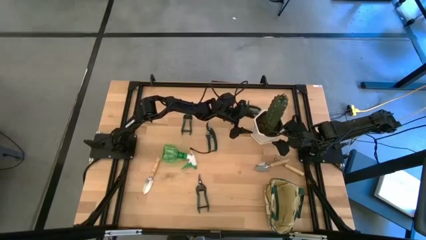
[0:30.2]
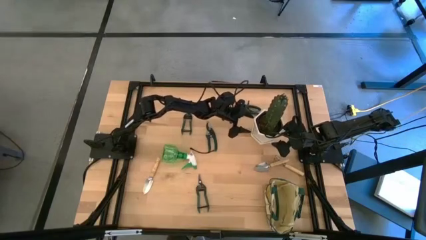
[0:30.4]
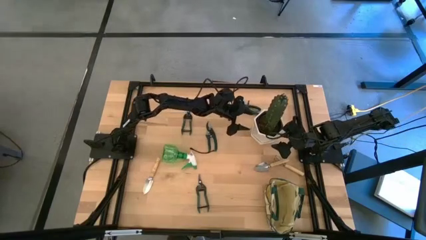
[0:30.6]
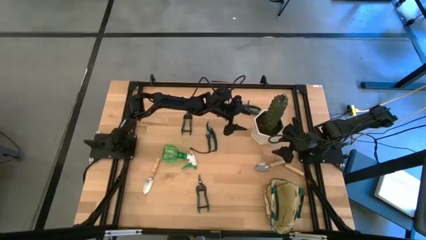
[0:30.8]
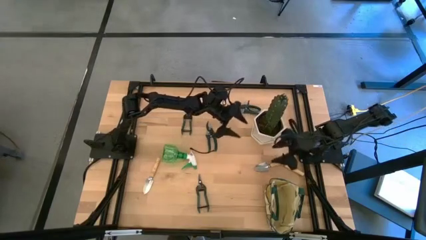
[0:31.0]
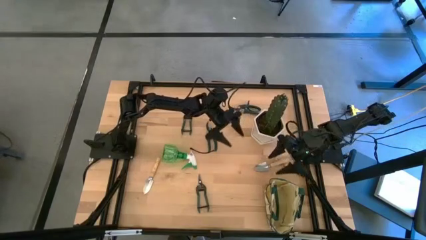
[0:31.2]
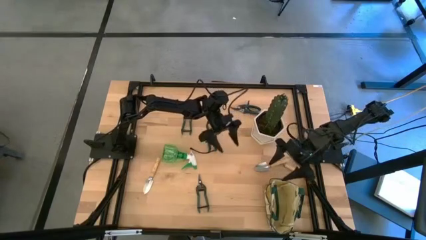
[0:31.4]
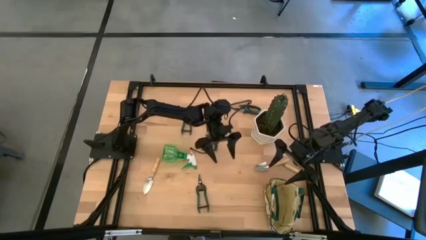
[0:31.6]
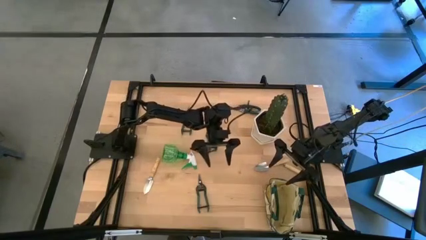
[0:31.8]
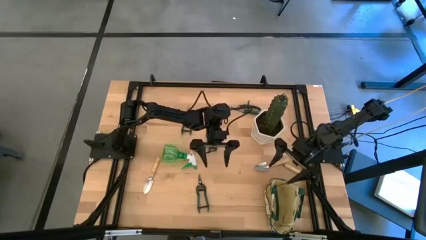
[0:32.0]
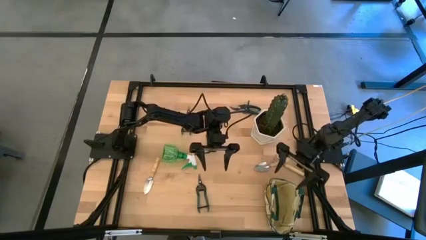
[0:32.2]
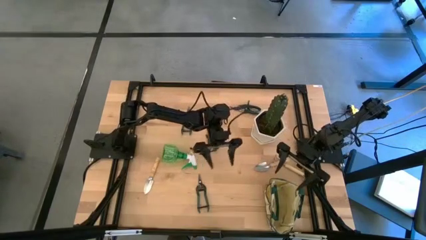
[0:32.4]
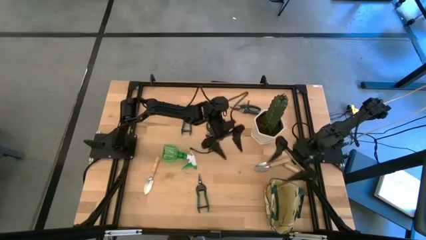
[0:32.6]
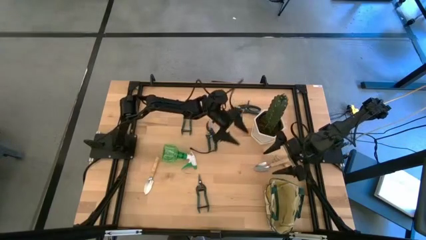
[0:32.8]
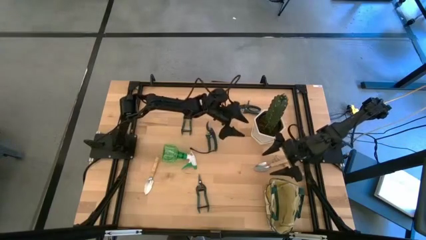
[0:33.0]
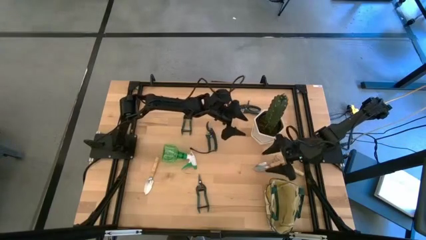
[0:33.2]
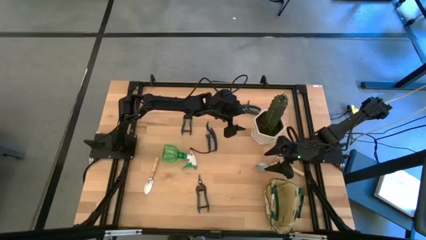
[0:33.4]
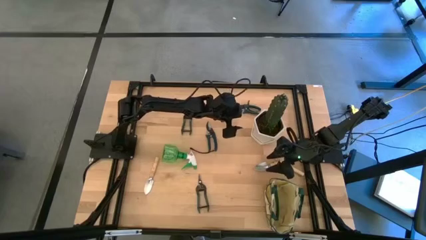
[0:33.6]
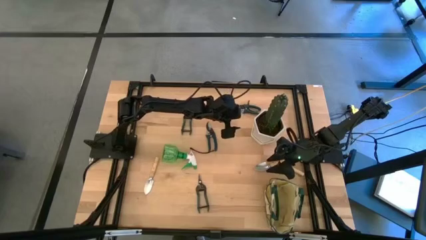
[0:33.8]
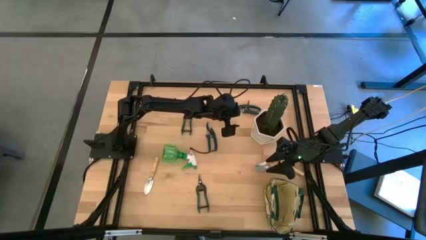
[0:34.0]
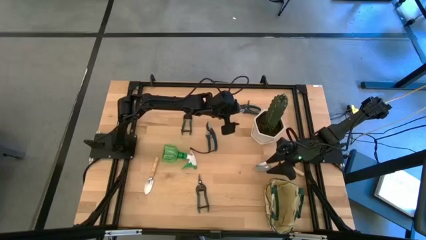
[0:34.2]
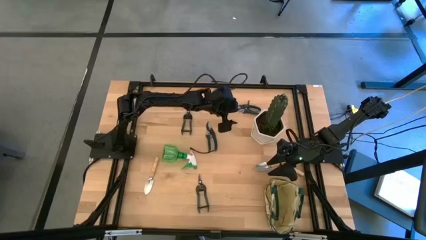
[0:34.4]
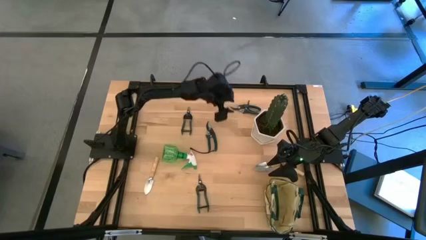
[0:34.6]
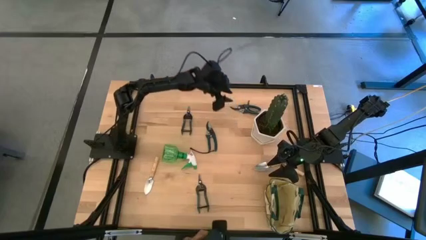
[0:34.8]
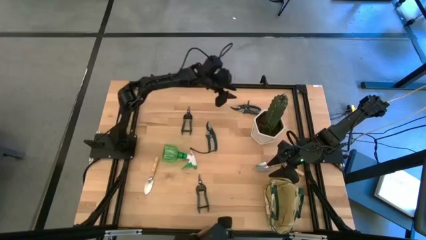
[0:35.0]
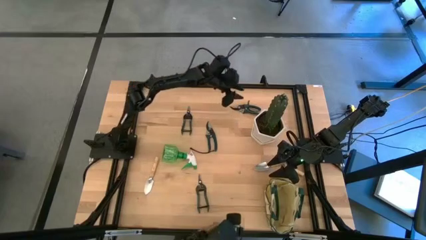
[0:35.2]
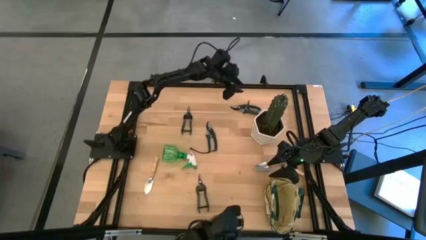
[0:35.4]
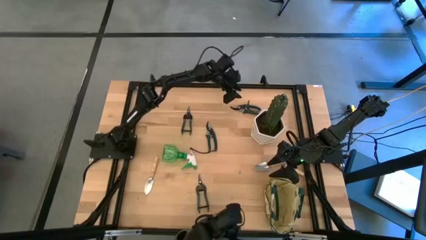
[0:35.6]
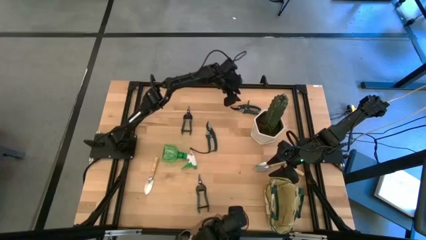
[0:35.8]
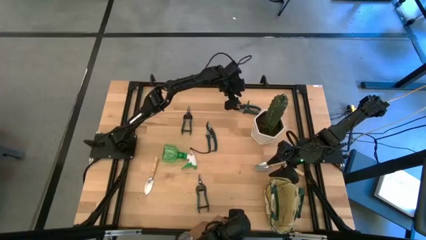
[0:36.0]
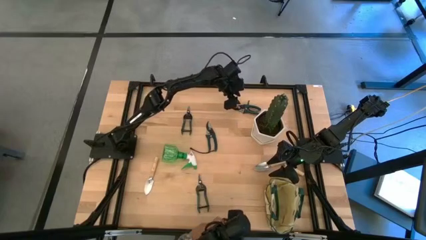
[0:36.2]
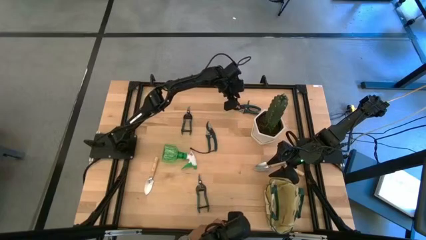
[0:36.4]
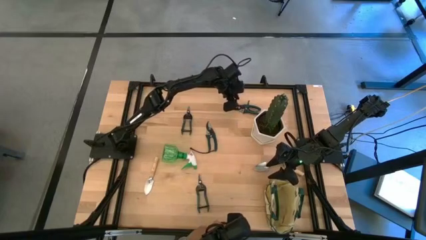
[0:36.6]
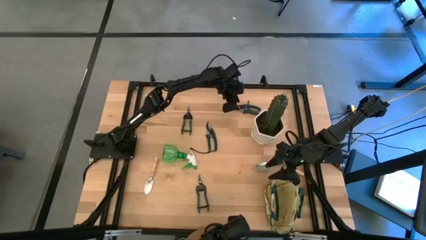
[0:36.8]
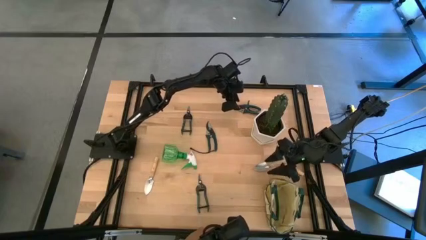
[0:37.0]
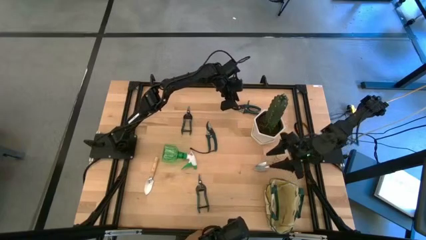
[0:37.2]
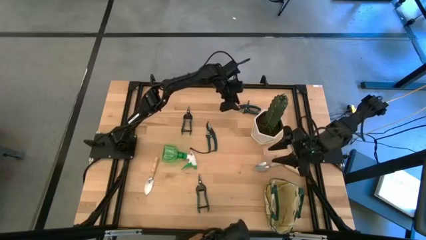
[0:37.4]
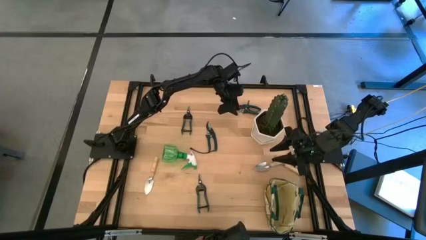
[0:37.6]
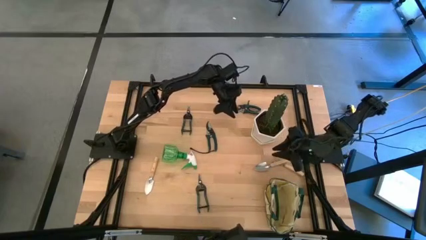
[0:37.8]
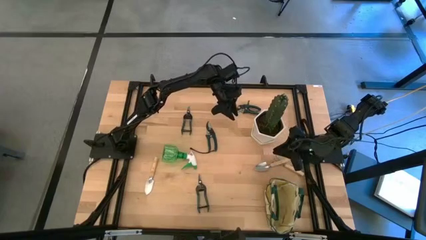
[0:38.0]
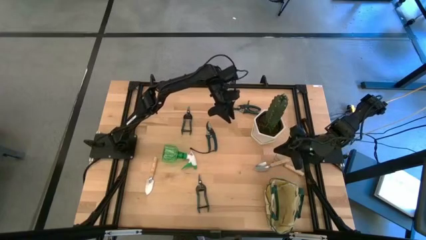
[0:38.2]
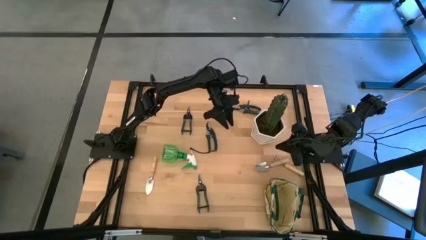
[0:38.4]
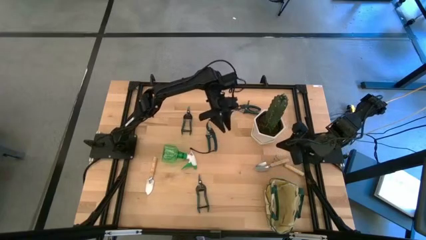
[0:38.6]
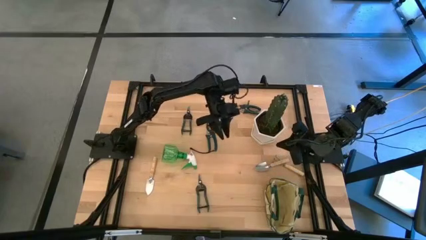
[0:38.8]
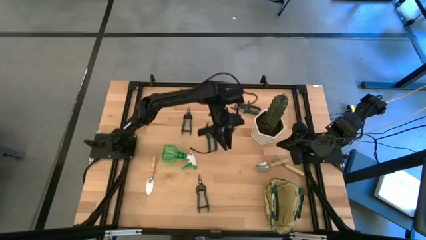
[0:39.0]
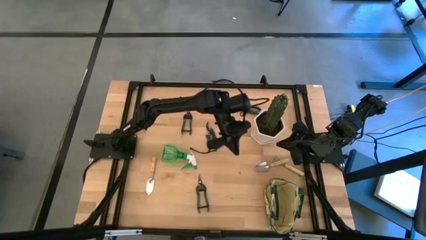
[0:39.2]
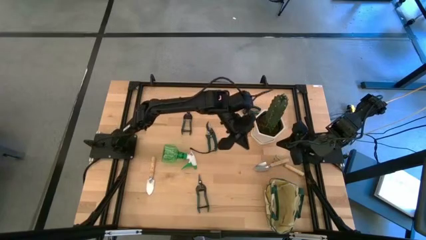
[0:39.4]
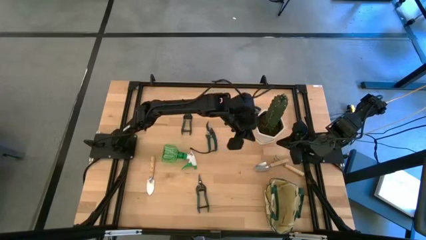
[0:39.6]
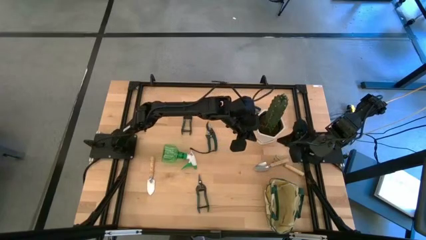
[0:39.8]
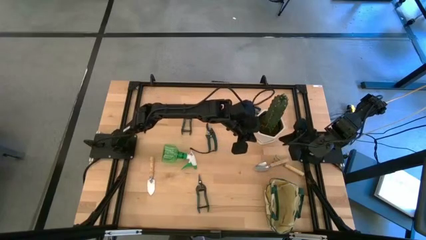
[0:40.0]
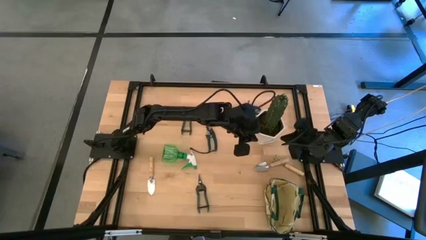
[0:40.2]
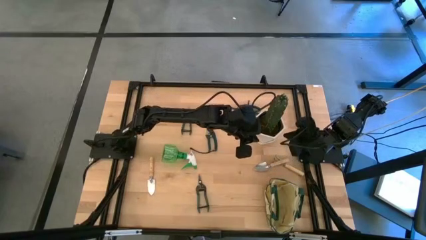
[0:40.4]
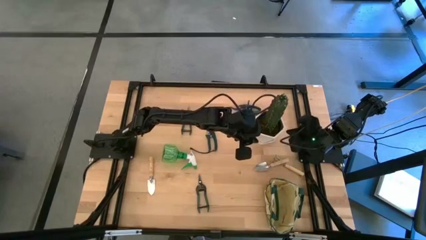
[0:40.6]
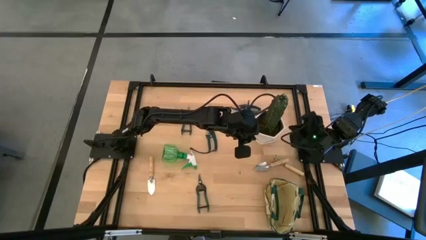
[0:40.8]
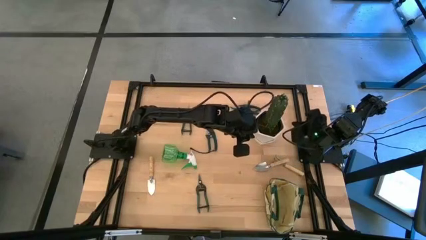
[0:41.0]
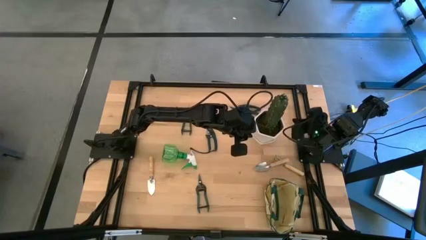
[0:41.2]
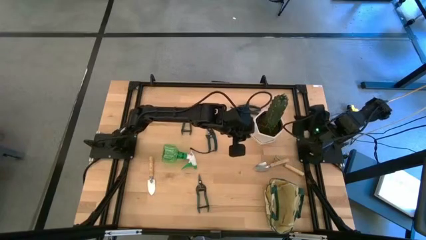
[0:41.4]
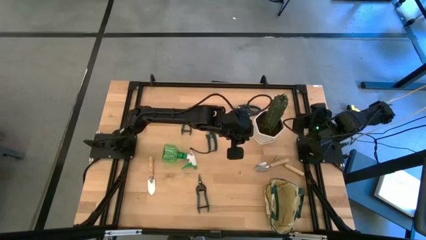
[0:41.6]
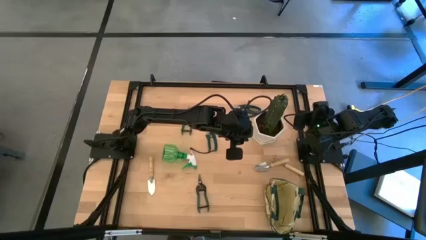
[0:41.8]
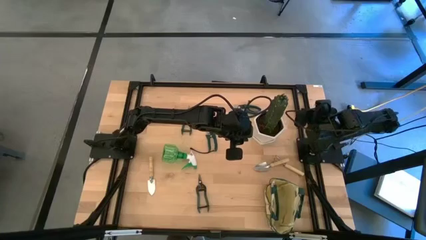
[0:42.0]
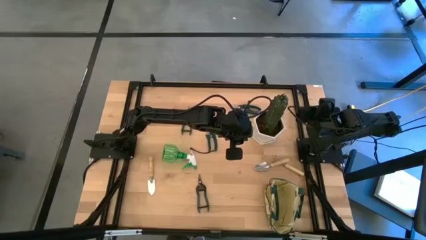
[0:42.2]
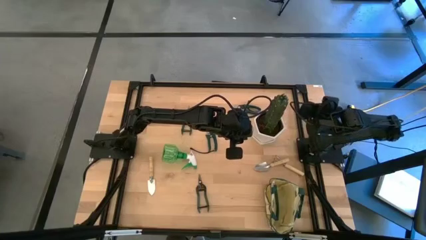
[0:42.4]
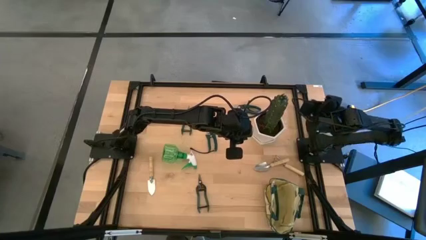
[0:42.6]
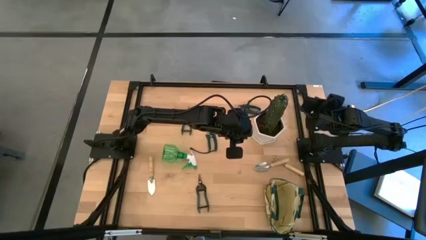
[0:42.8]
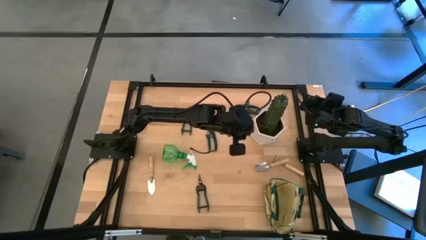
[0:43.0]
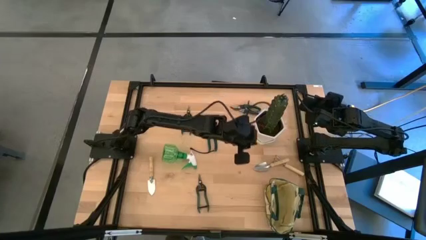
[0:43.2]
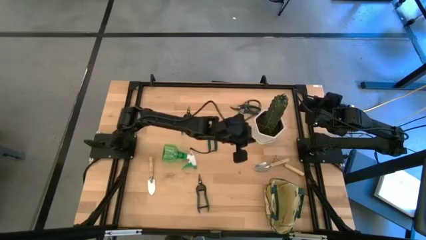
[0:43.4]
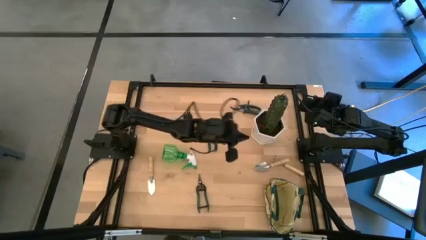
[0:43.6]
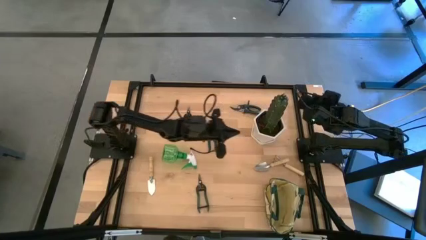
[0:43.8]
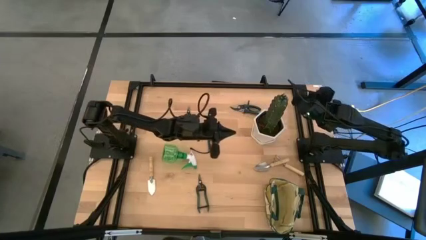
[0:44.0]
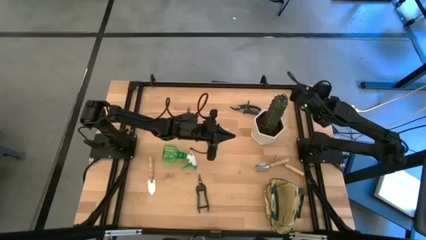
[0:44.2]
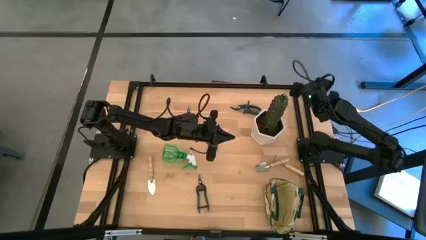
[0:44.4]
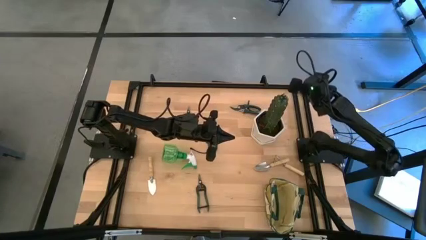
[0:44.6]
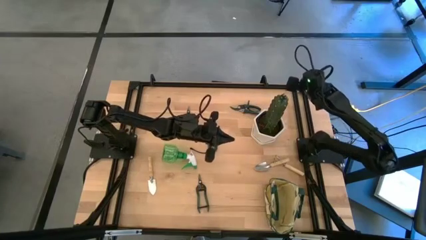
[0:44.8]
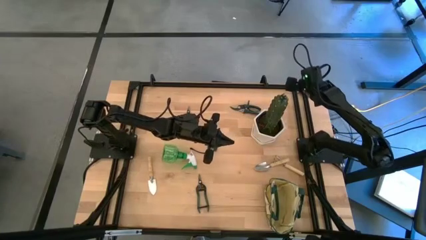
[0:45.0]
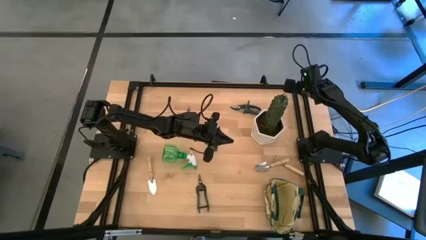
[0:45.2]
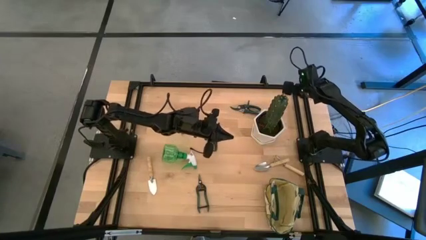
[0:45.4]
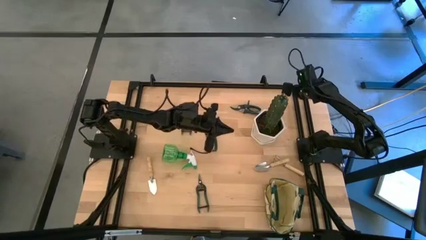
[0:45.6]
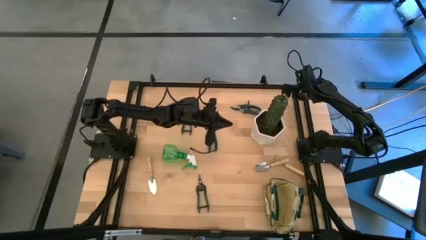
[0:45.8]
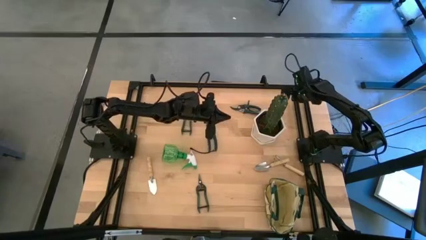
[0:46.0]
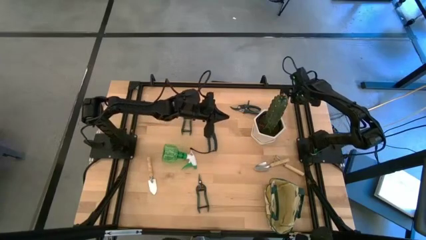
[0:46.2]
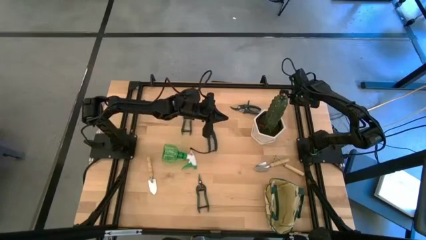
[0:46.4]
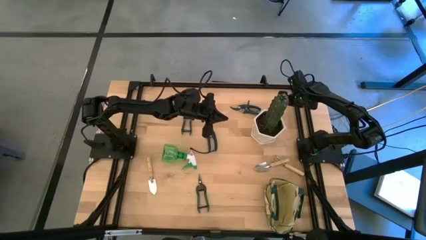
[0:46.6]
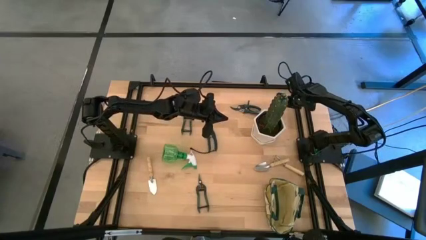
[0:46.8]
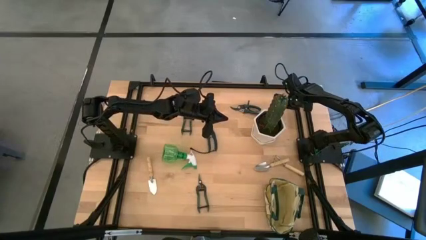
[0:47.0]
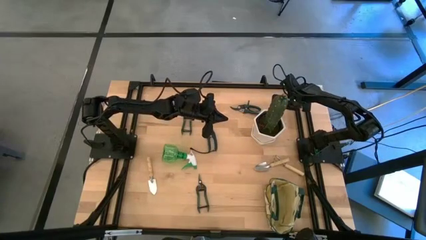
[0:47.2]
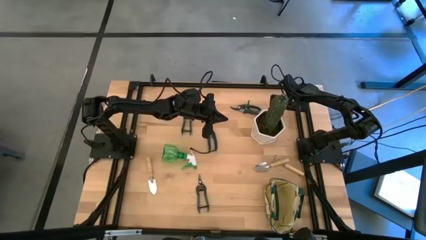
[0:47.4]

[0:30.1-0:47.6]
Task: Pick & Place Garden tools in Gardening bag
Put the top right hand pruner into the white bag
